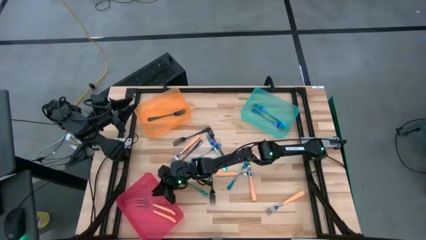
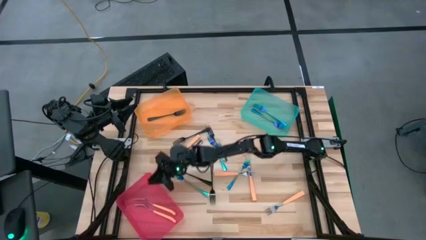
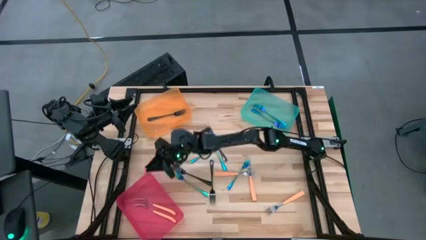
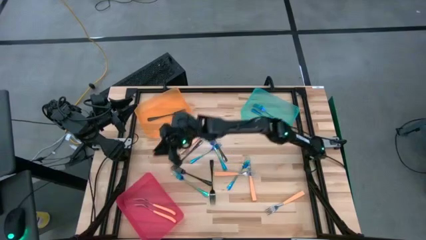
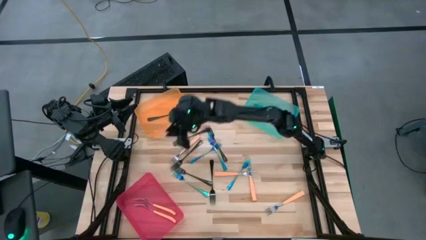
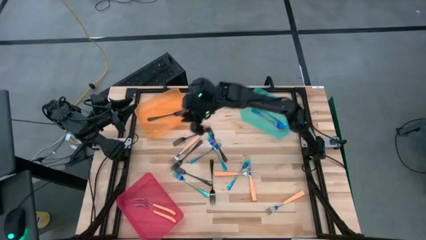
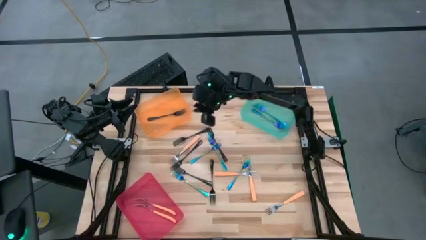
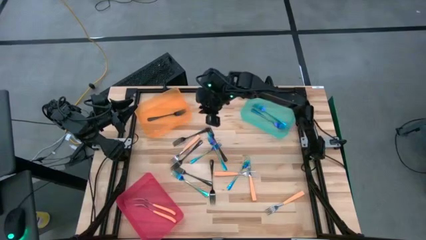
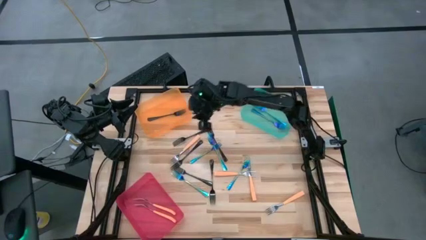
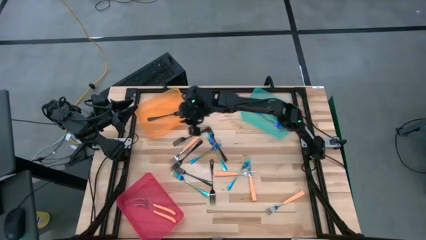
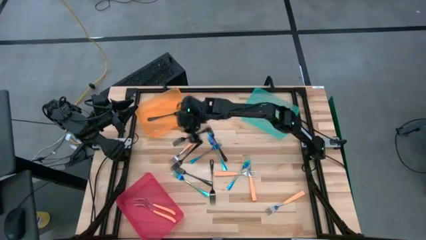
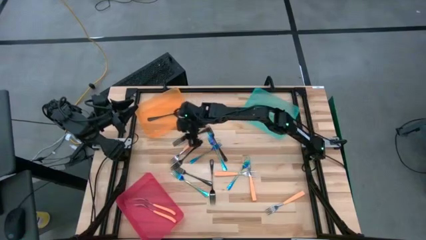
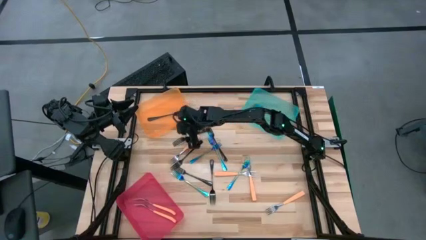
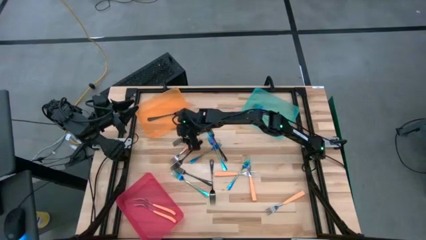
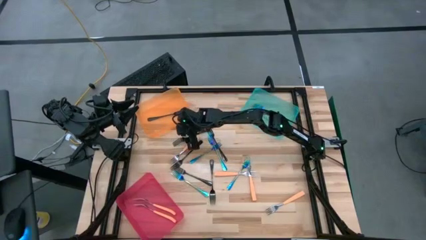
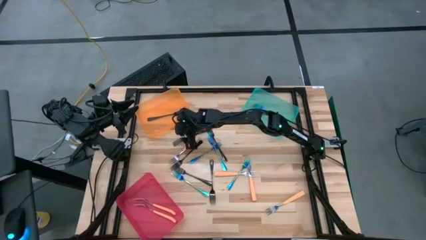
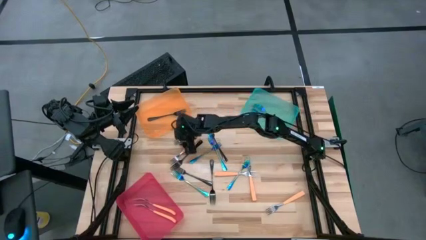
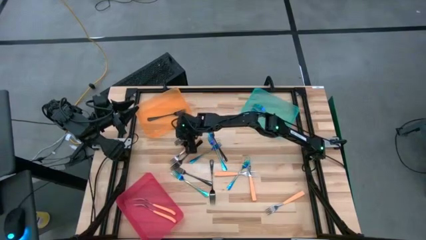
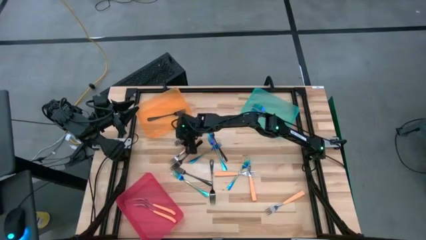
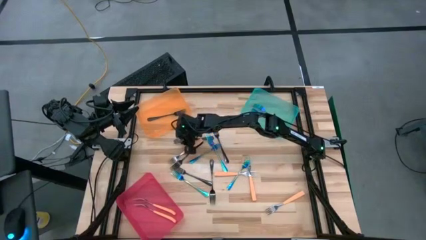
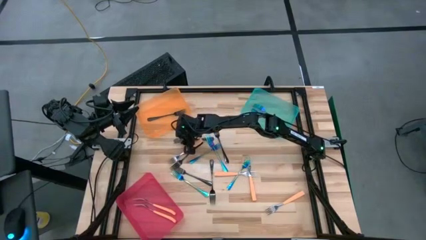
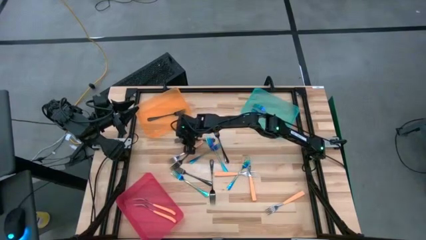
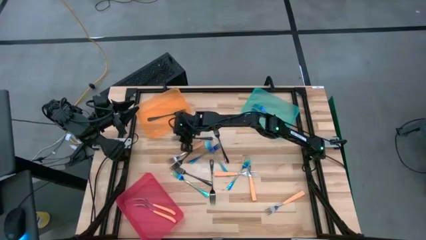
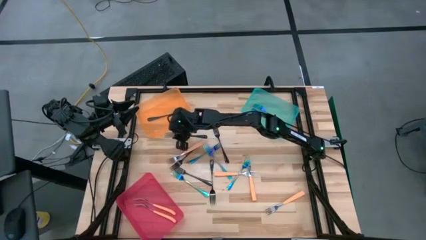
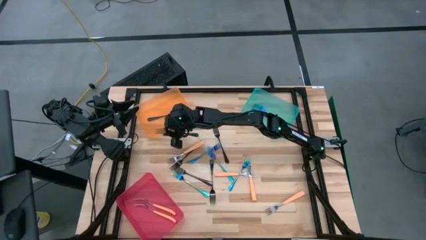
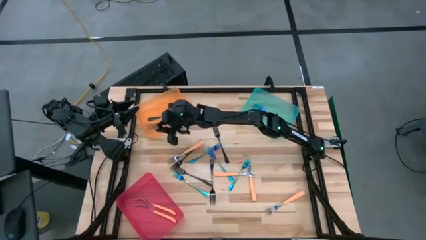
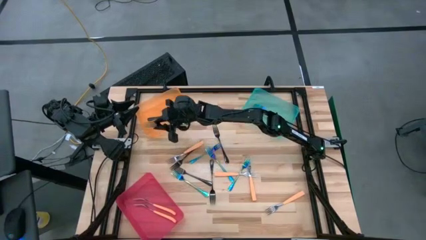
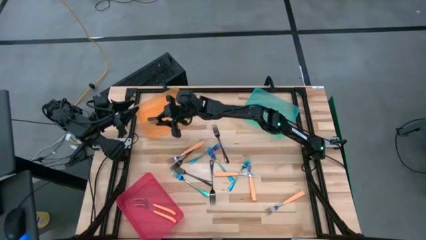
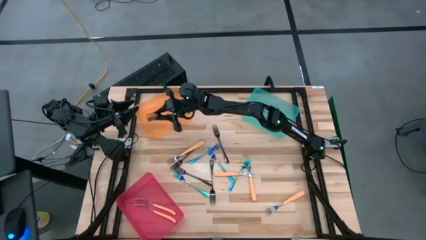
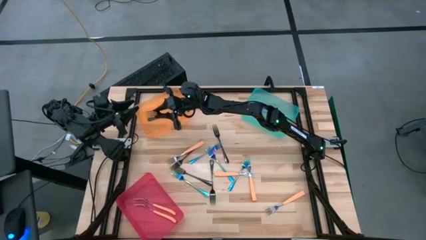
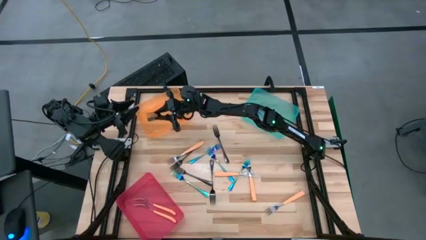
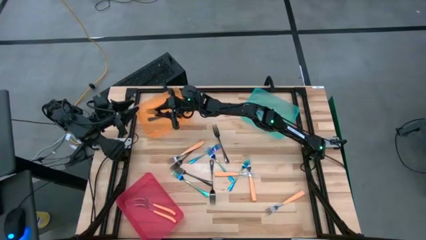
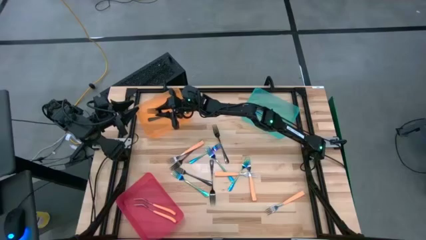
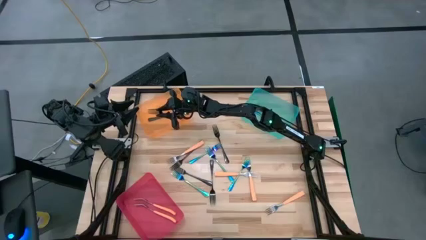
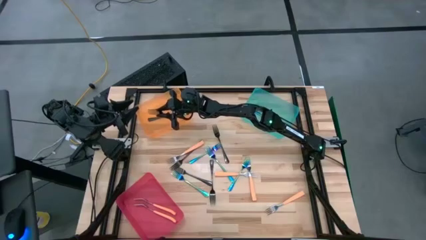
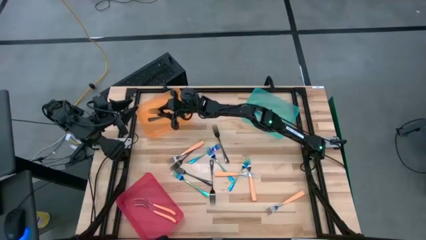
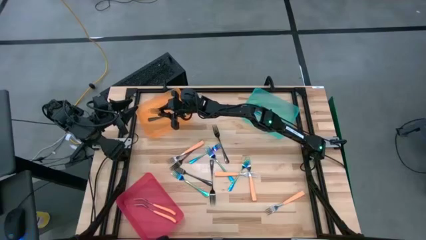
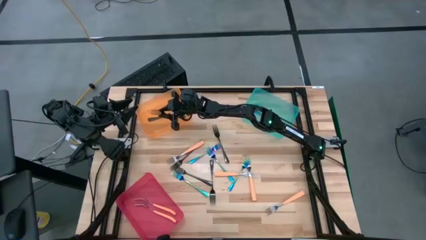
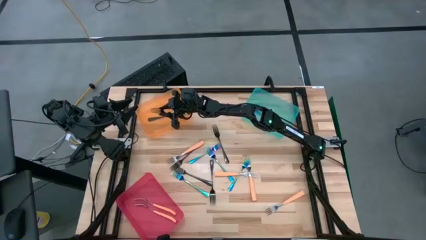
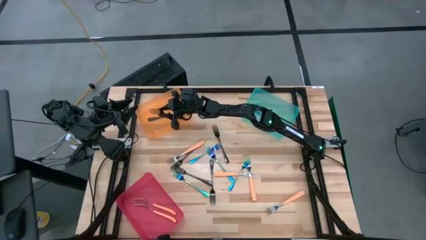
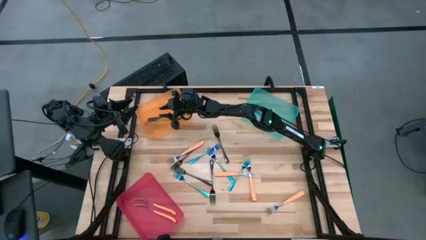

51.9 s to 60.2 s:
Task: Sort silverware by color (type)
Put the black fork into the orange bin

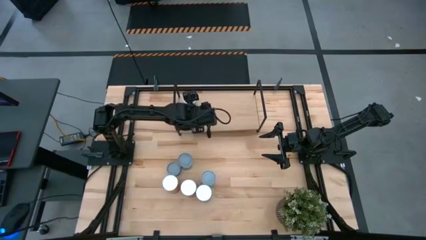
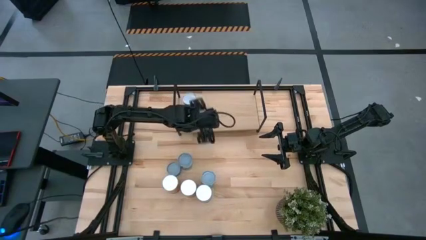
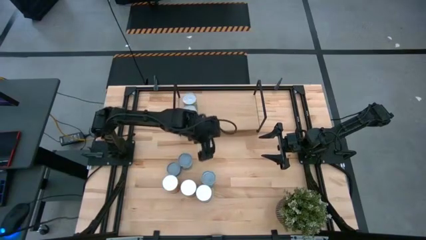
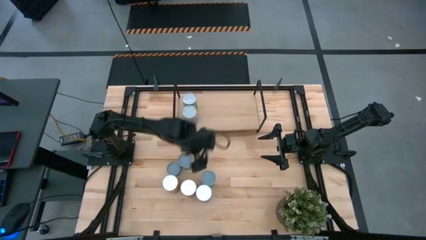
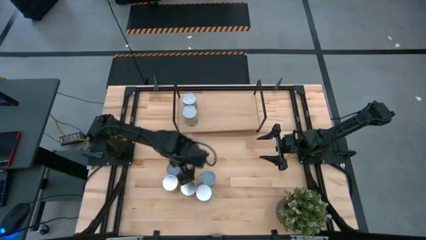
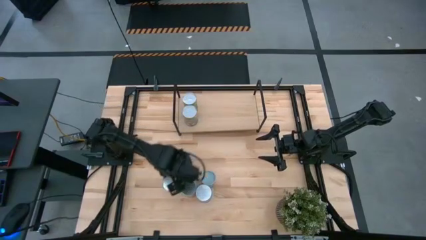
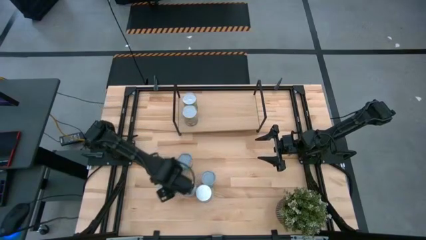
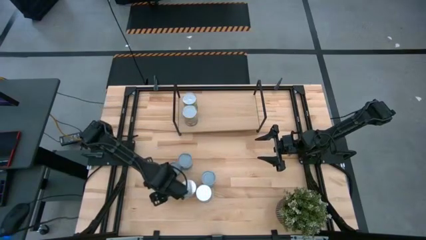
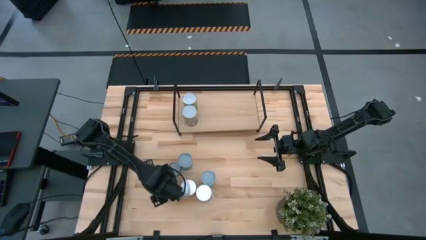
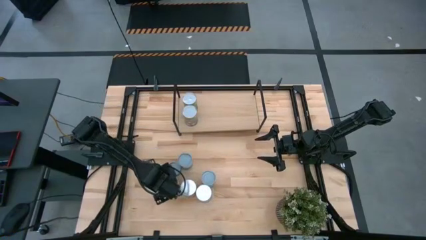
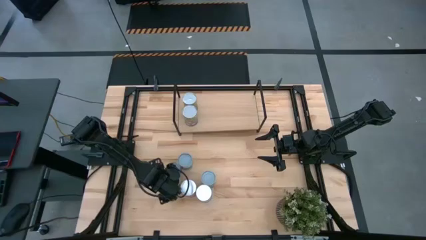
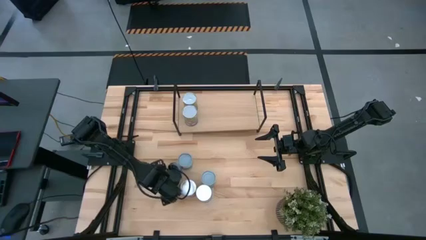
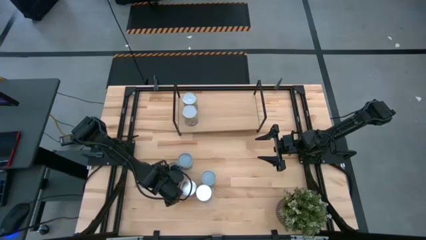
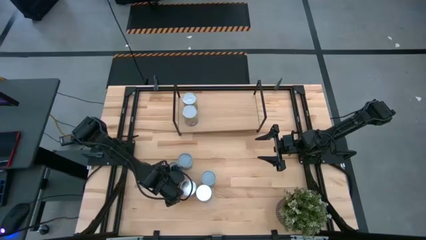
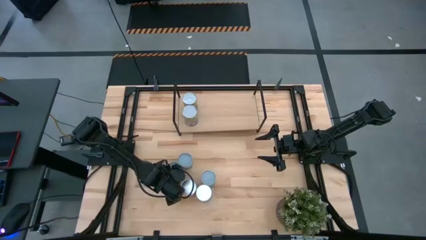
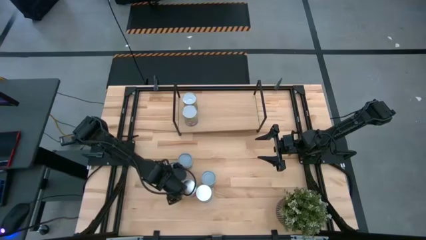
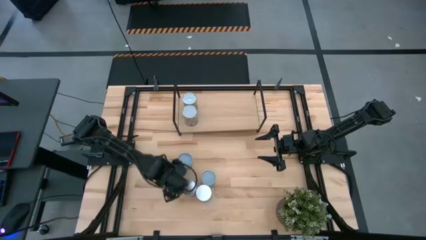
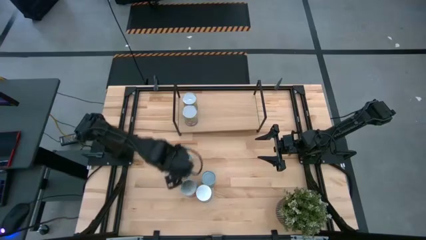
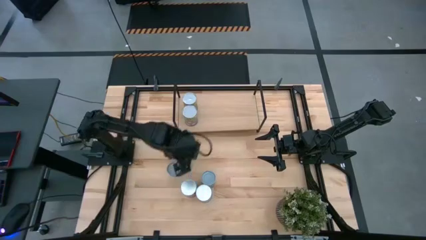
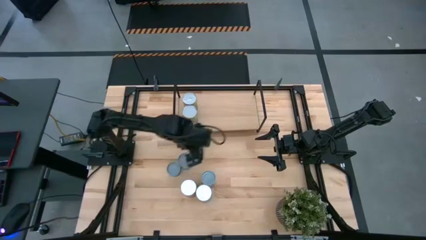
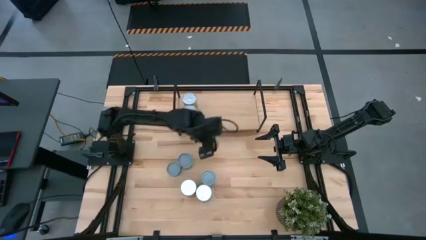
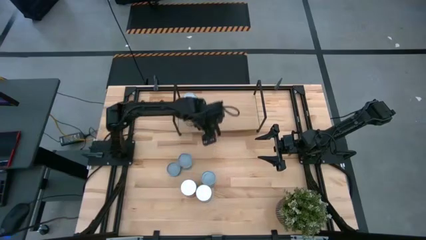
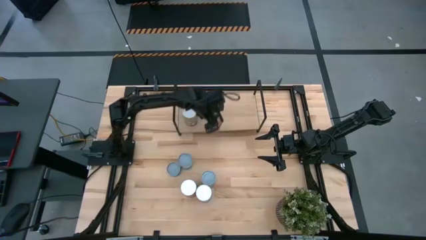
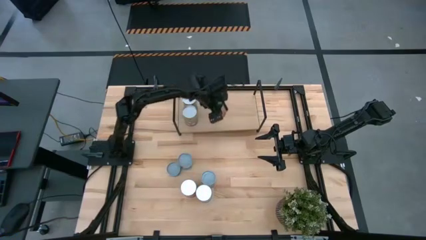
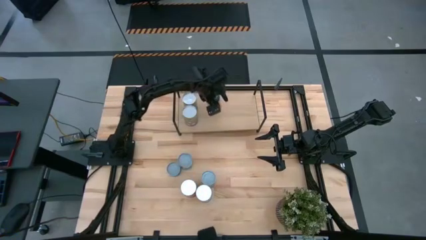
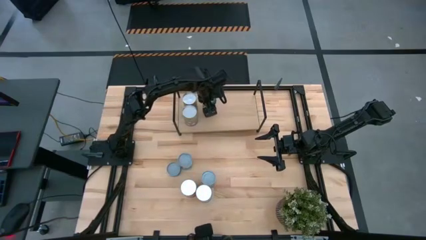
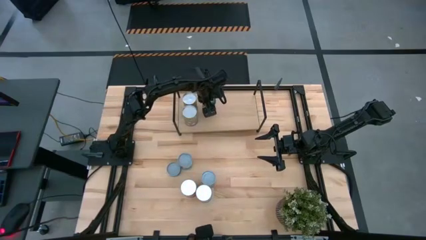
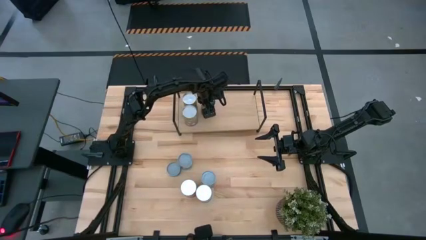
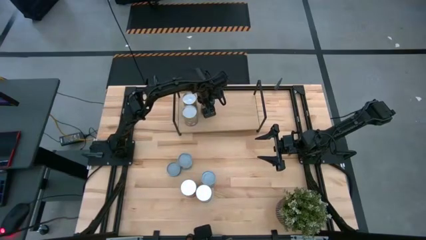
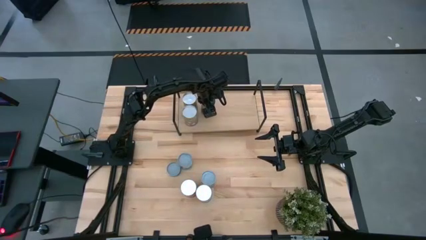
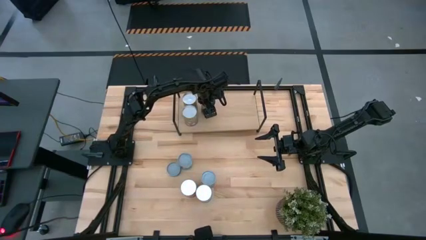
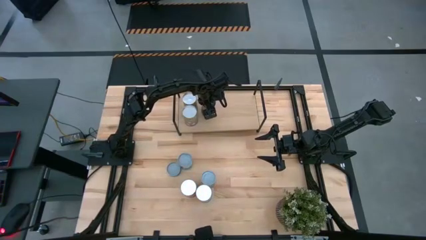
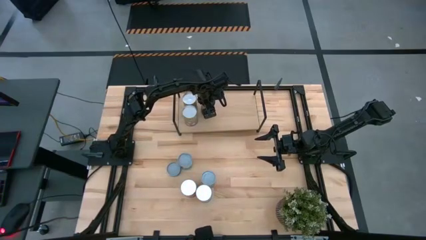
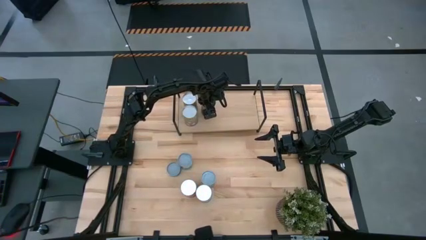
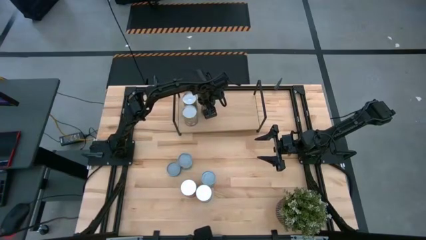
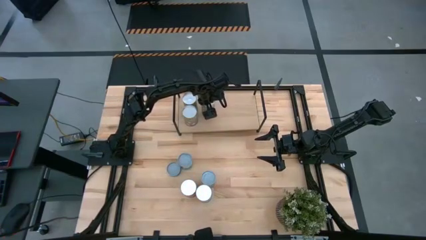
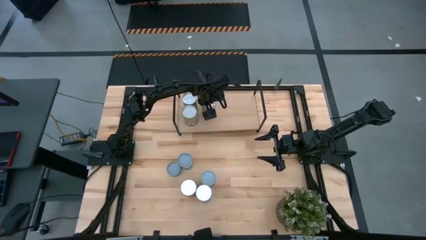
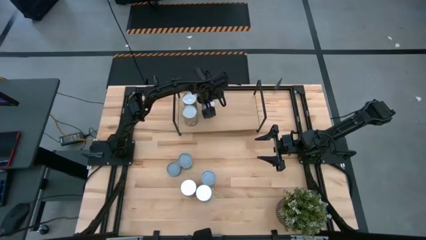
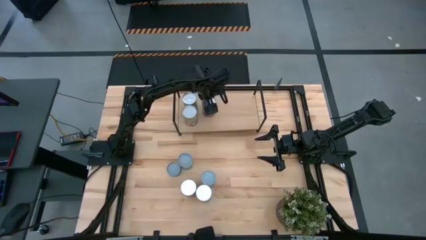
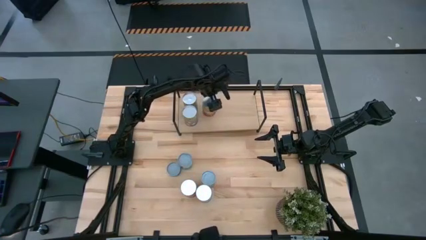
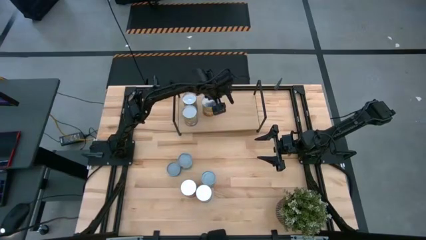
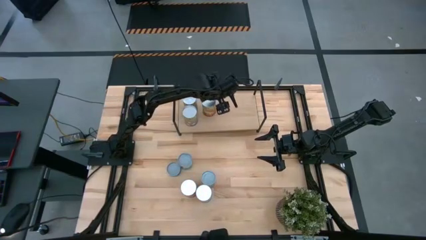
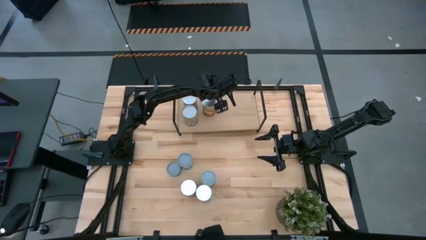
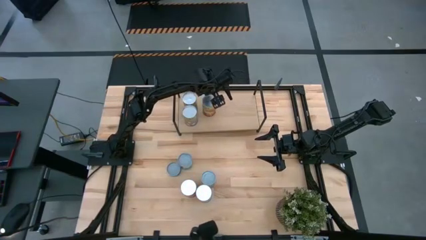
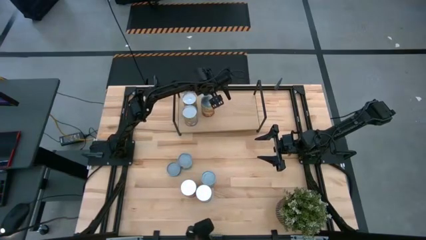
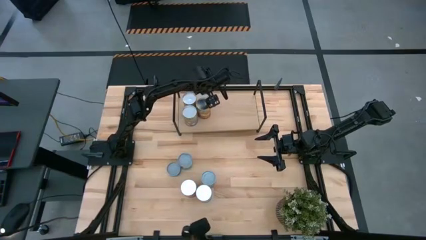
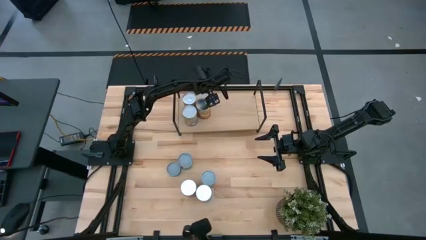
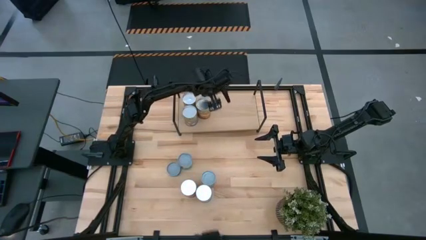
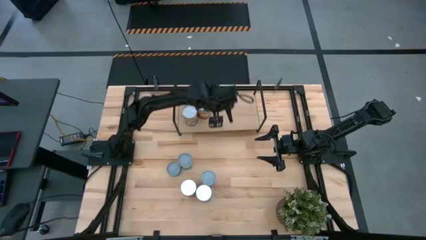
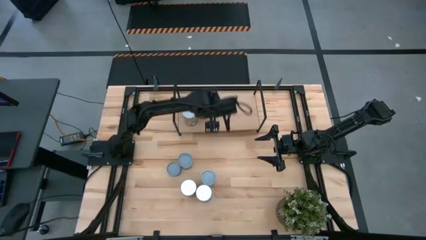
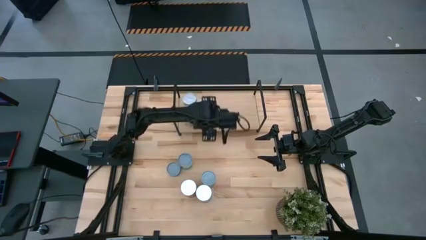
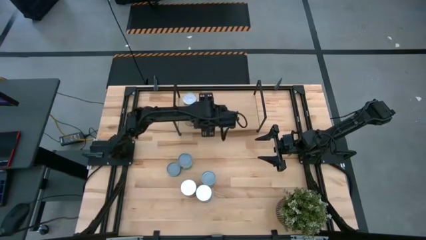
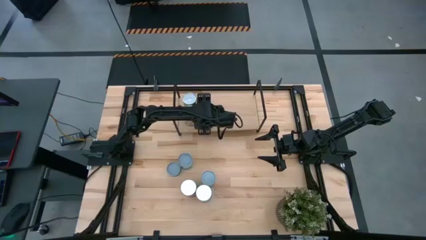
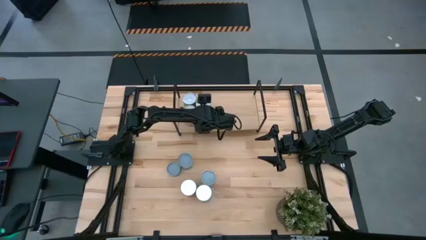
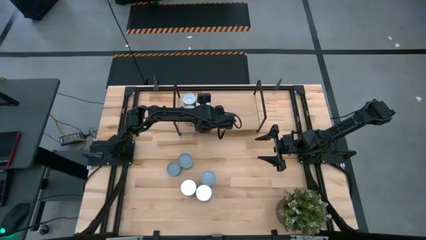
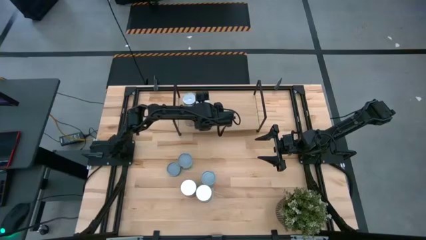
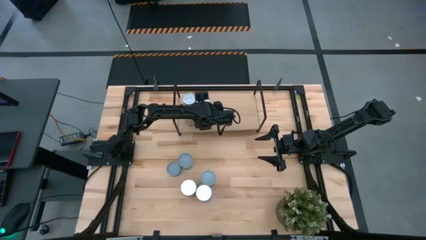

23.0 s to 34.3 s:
Task: Pick and place cans onto a shelf
Put the canned corn on the shelf
